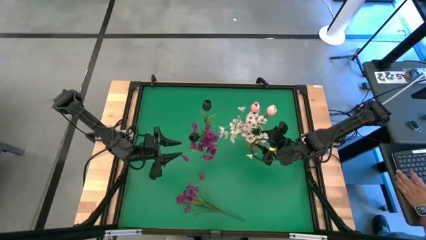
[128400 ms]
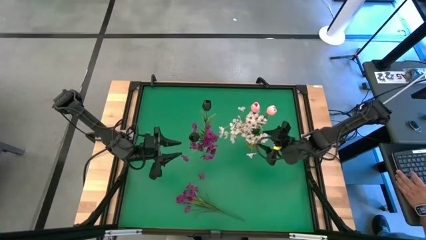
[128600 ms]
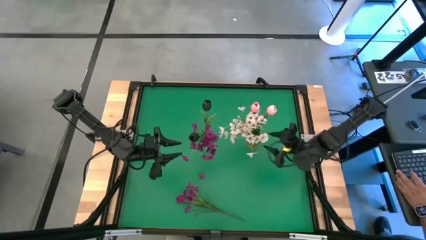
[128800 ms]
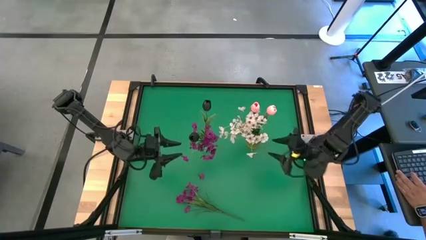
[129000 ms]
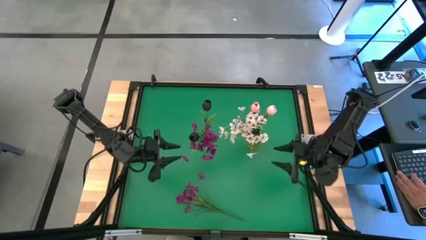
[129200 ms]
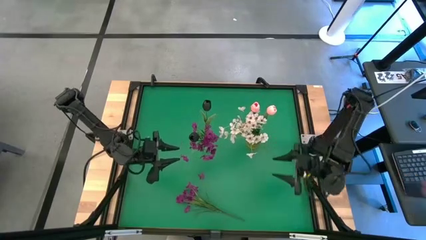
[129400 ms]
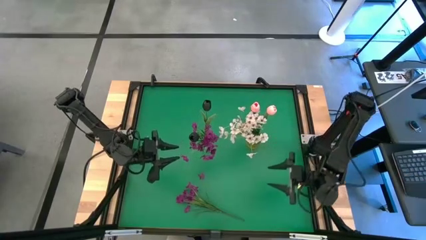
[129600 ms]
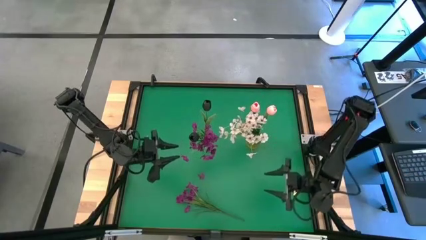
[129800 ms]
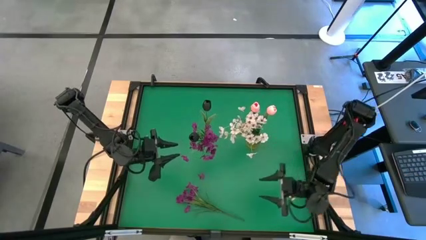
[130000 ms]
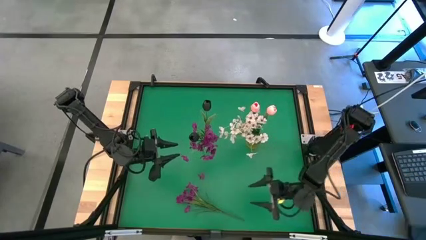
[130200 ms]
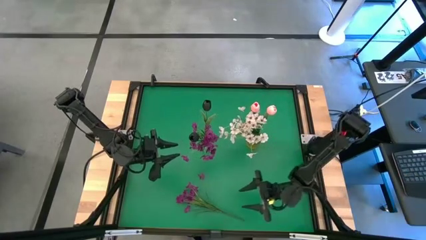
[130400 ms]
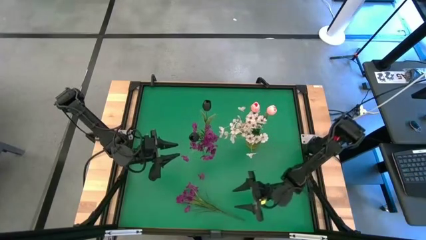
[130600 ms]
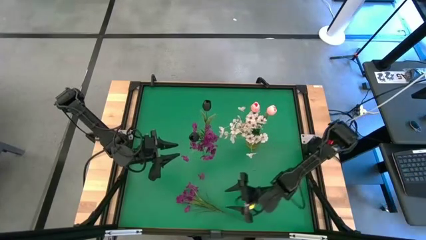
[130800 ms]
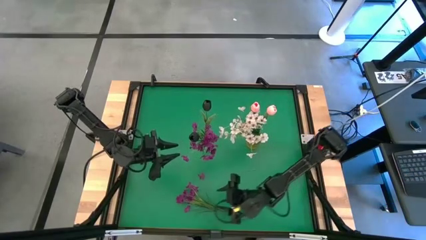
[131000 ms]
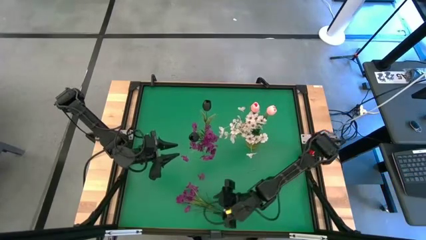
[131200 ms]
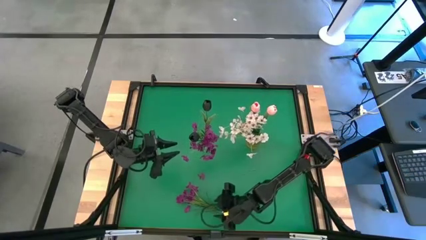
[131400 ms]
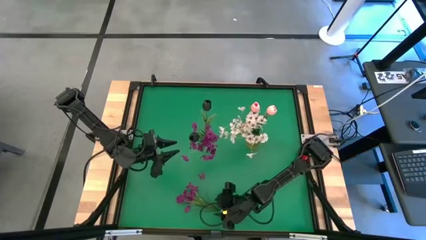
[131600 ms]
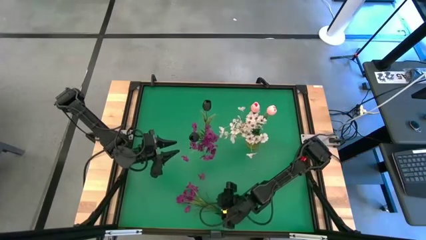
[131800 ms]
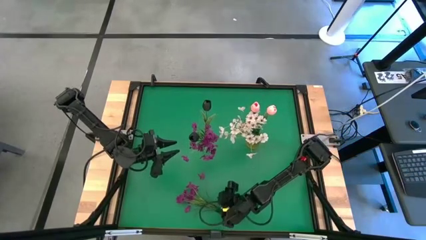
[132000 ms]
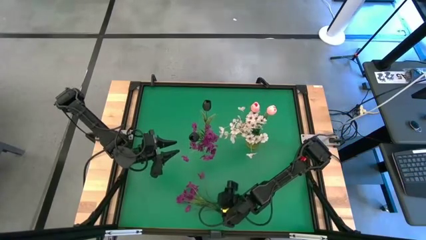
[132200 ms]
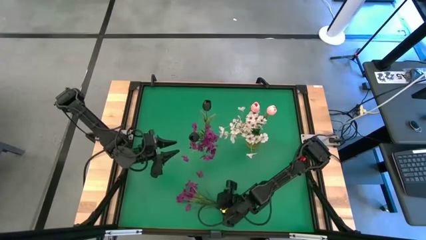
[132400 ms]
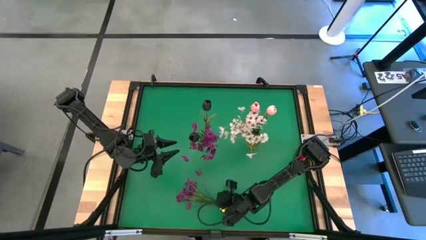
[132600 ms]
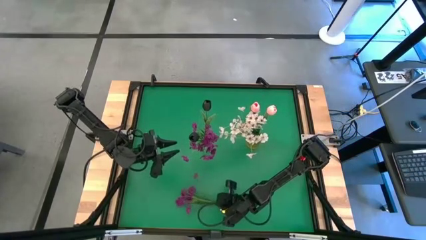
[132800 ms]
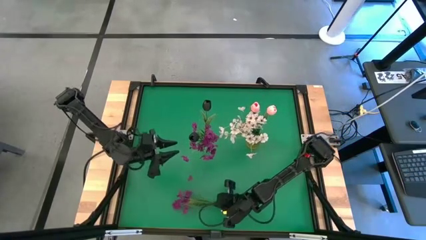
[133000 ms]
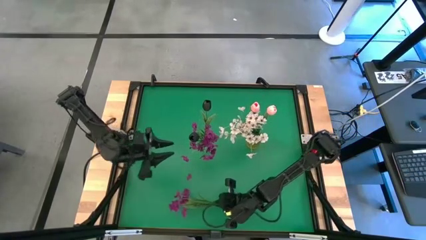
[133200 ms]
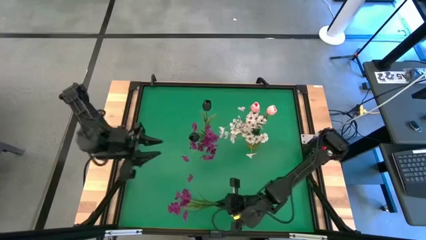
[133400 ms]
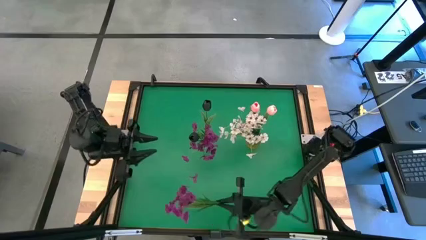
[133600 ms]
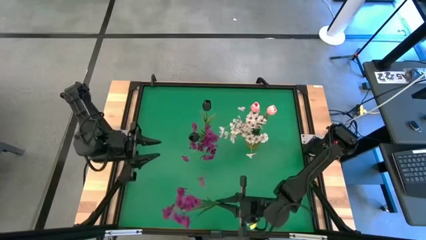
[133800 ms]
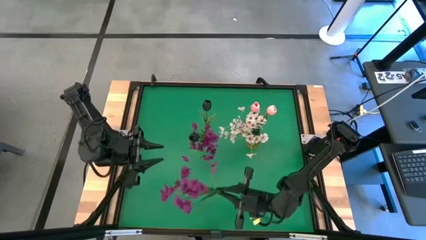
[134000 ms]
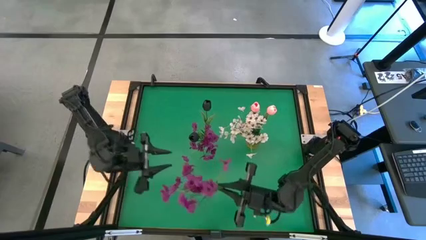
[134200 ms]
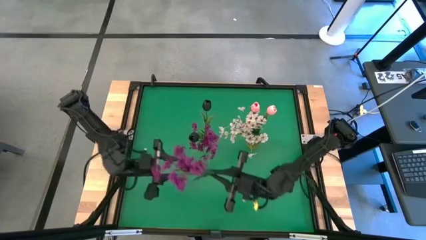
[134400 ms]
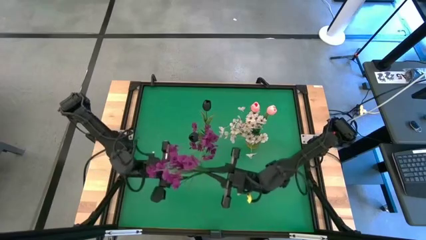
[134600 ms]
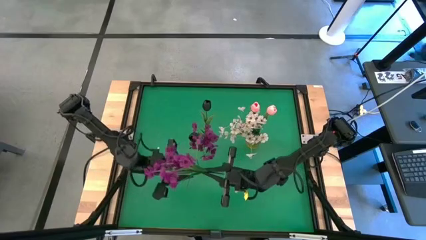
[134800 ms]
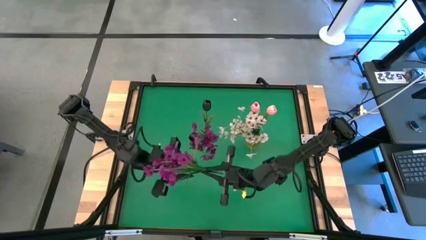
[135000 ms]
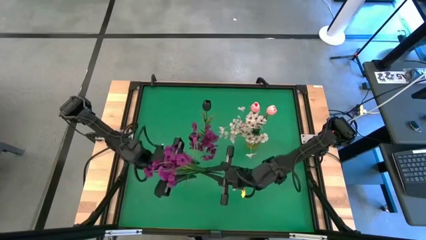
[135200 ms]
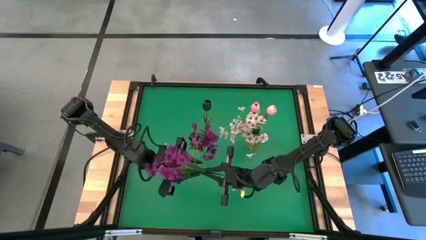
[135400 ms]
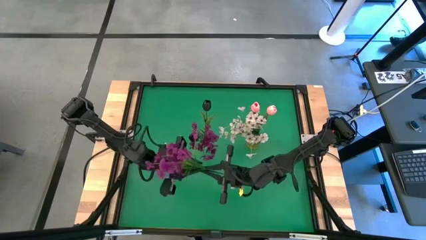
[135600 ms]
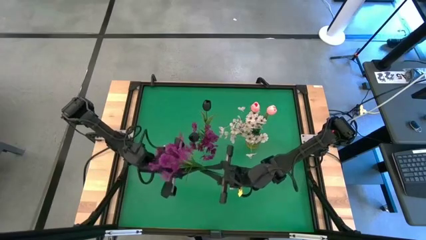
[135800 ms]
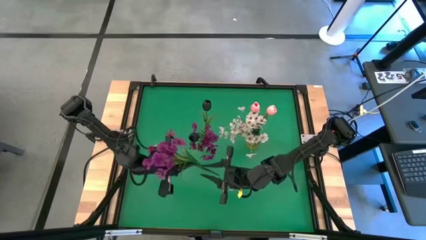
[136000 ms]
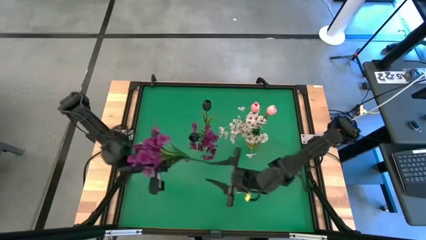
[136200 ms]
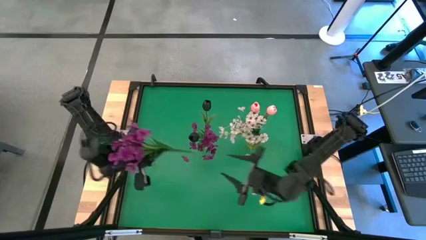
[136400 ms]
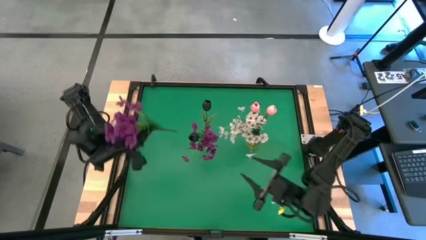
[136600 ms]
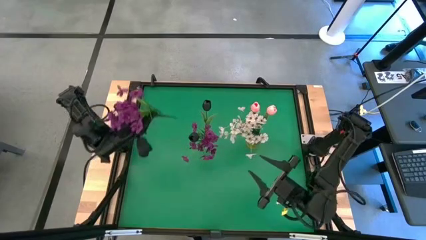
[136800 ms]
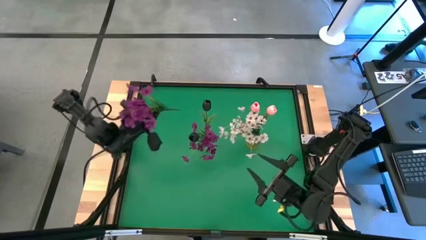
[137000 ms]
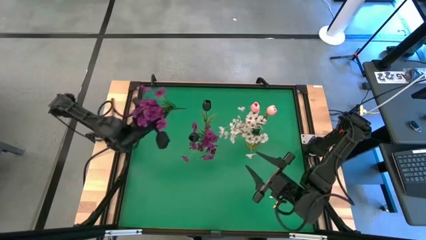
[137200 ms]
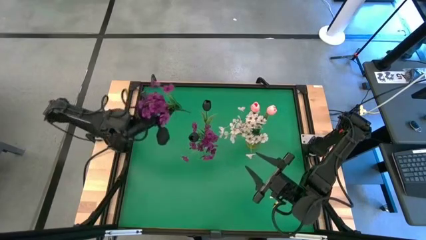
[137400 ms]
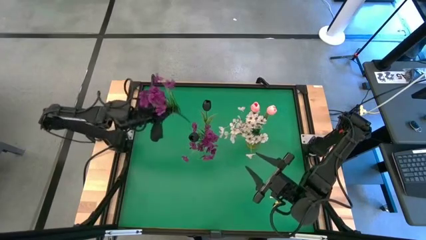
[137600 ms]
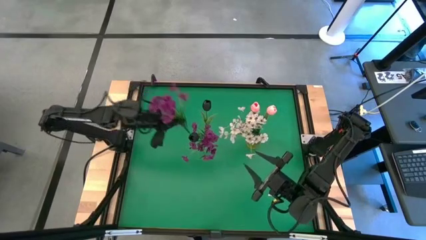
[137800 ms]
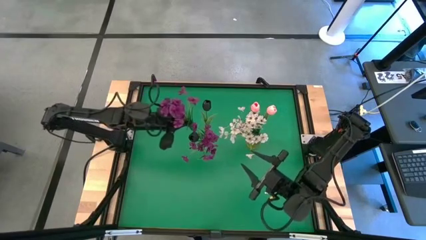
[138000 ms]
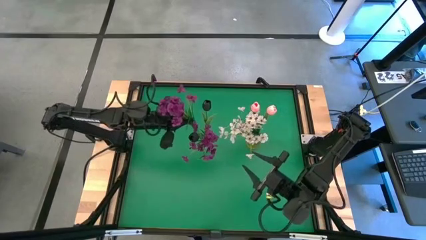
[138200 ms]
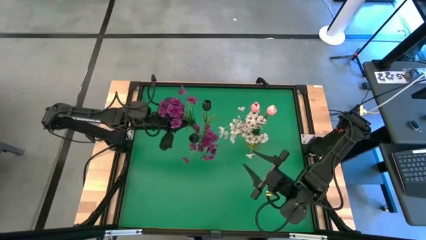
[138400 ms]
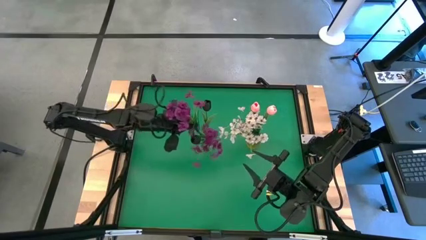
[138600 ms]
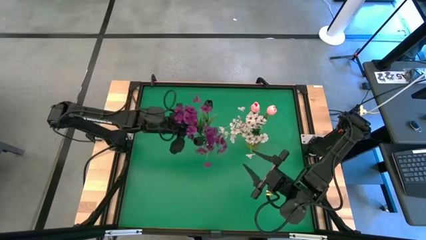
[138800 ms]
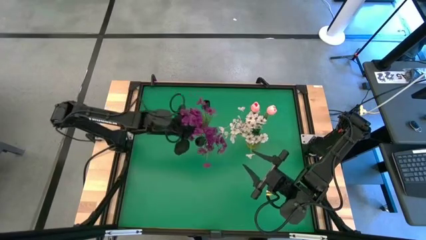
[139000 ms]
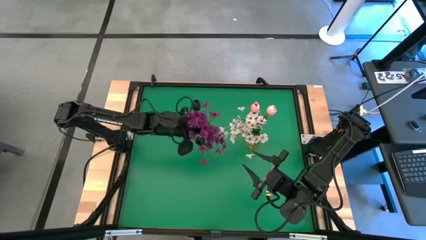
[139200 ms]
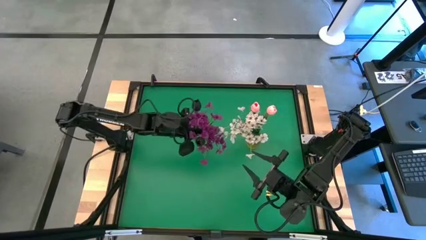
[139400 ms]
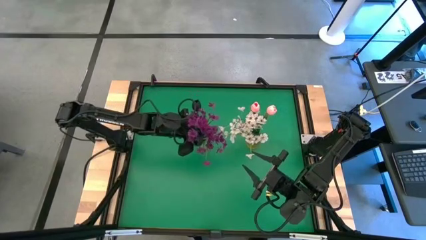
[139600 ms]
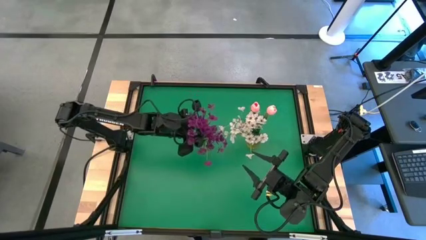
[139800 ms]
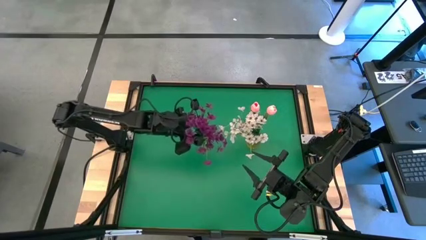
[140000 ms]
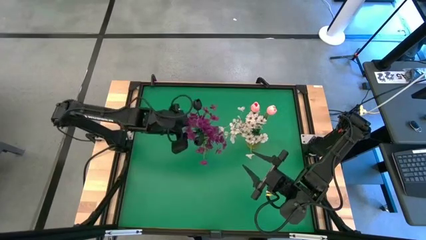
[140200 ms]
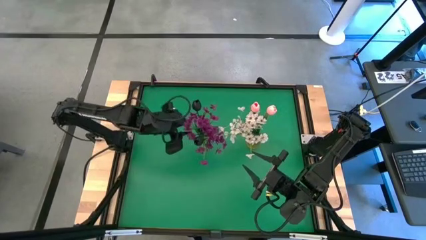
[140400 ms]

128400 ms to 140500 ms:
Task: Sort flowers into vase by color
Put the violet flower into the transparent vase

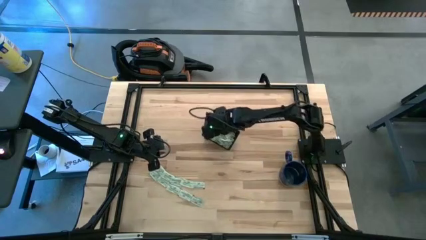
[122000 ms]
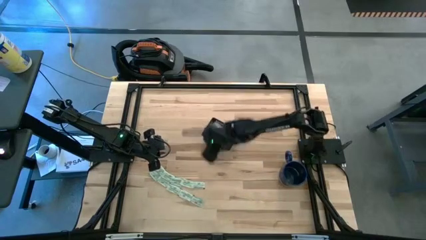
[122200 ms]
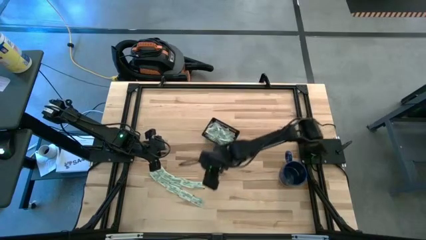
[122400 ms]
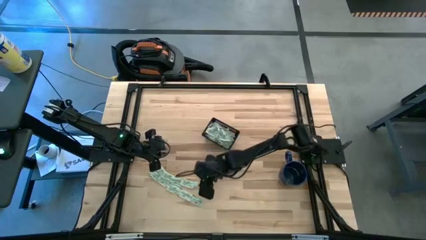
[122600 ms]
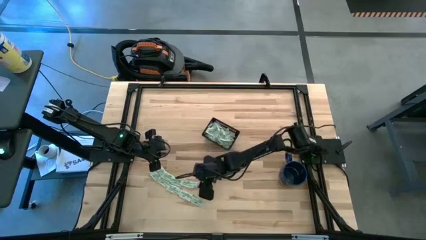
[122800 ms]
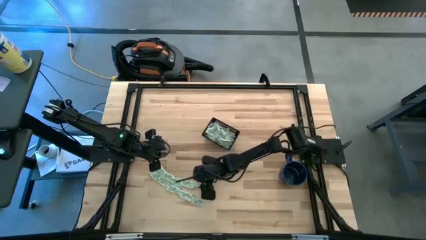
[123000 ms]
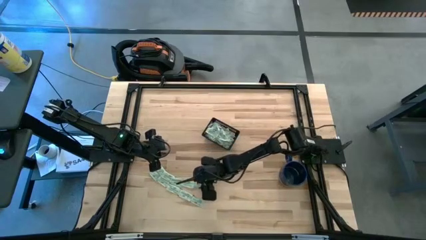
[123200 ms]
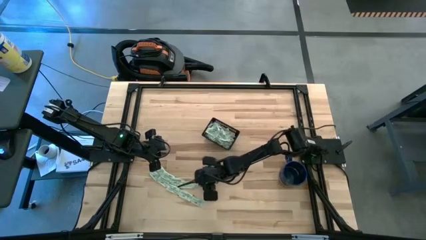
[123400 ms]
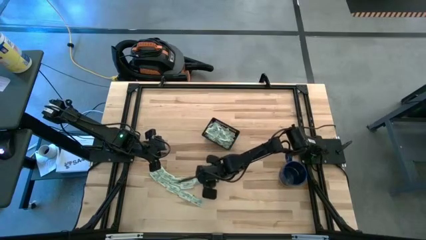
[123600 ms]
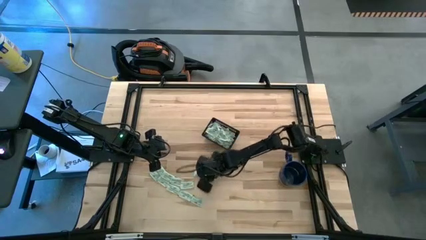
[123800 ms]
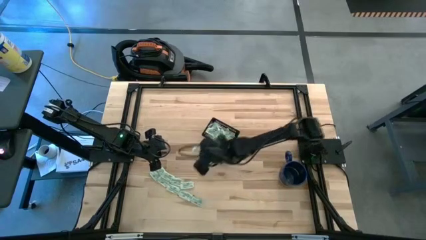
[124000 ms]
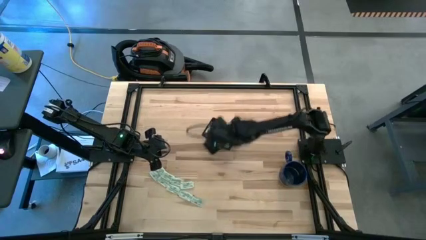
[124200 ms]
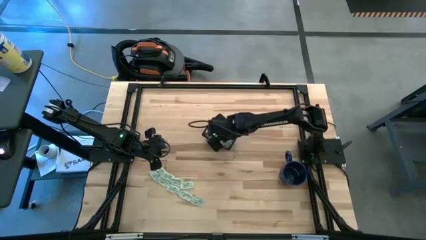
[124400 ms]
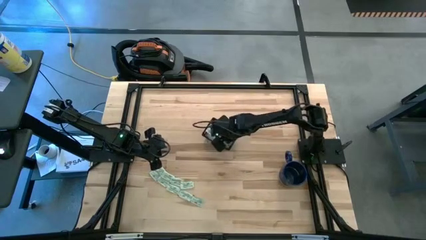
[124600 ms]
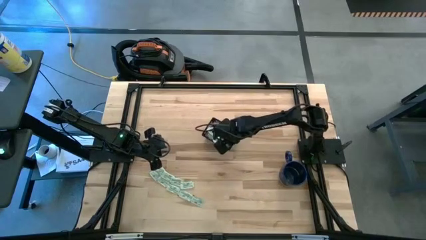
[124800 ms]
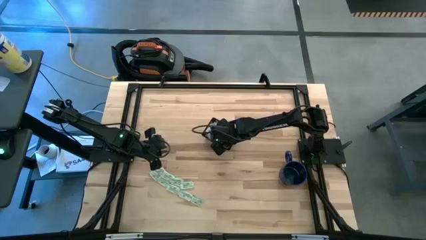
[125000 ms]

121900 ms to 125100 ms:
Task: Pick and place Stevia / Truvia into bins
Put the stevia packet into the black bin
